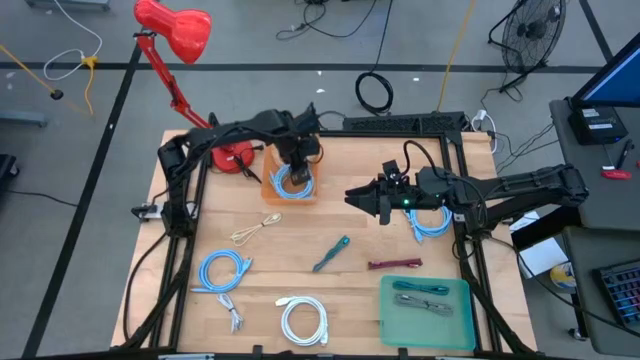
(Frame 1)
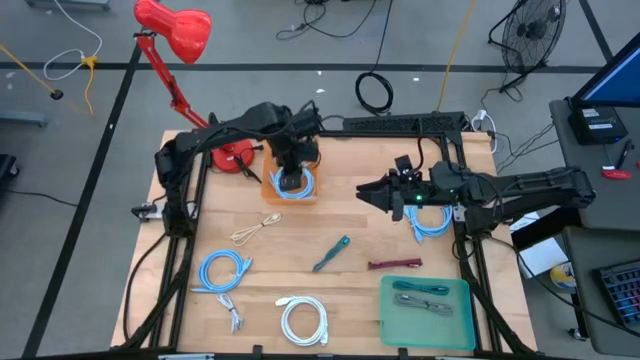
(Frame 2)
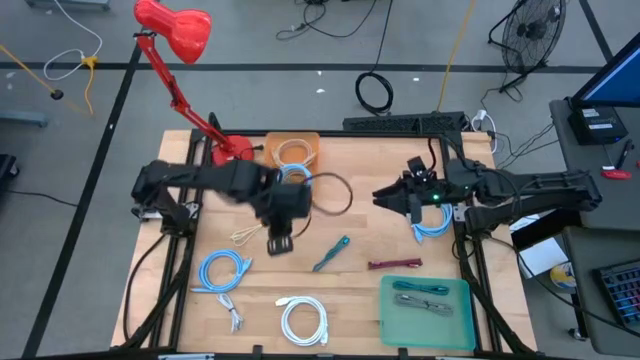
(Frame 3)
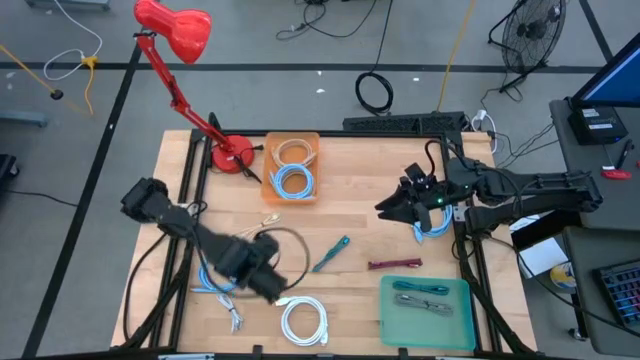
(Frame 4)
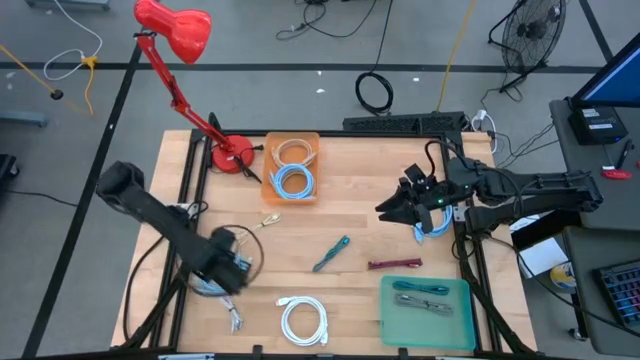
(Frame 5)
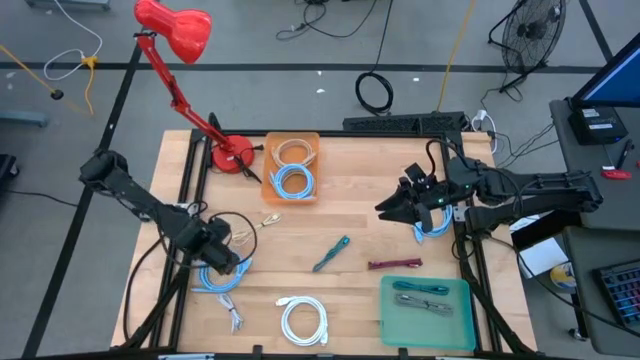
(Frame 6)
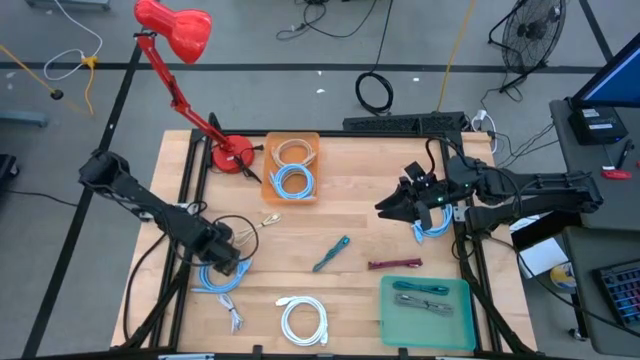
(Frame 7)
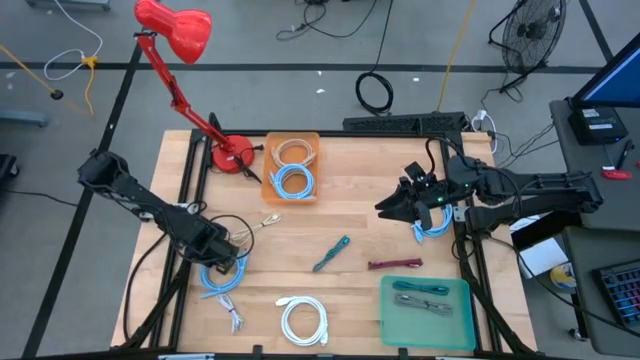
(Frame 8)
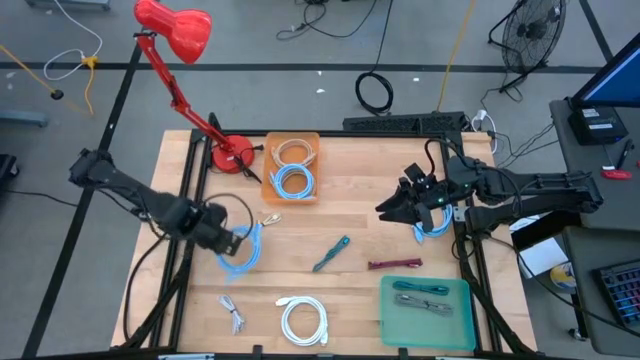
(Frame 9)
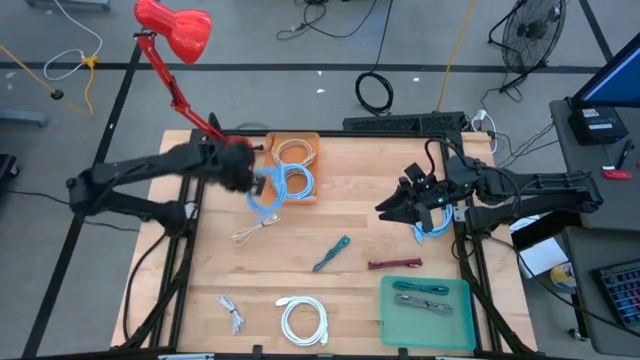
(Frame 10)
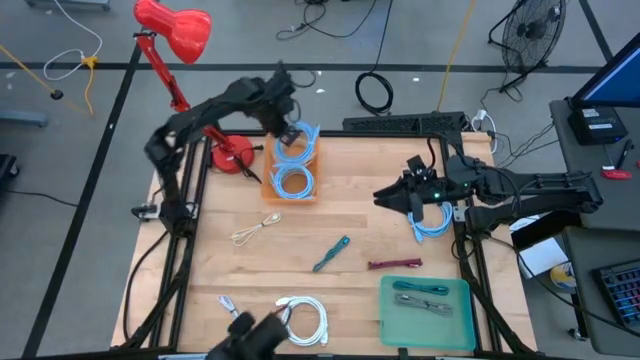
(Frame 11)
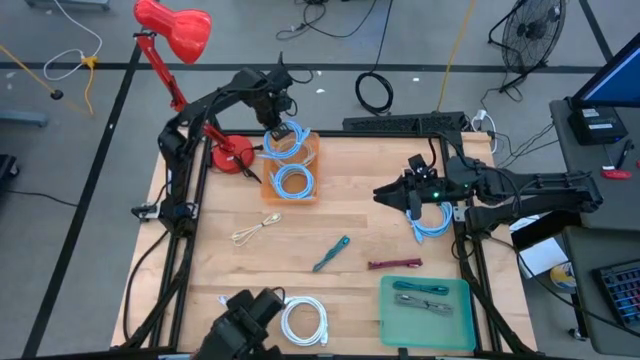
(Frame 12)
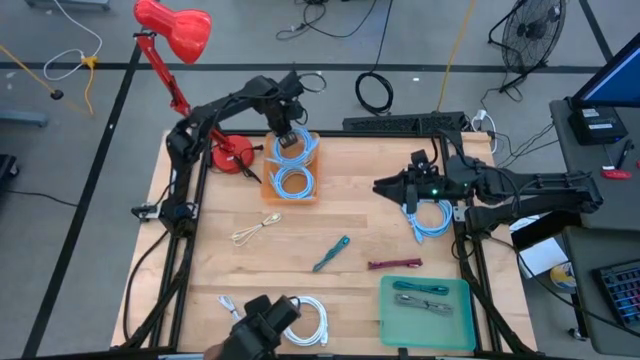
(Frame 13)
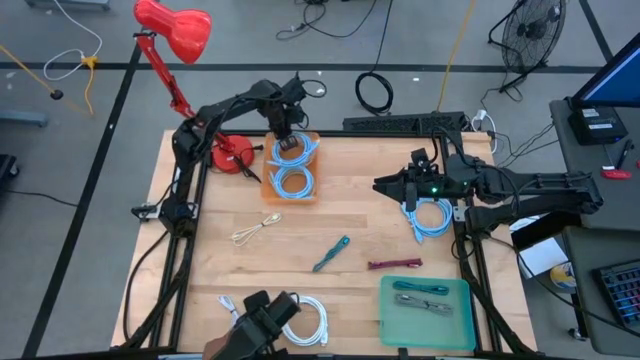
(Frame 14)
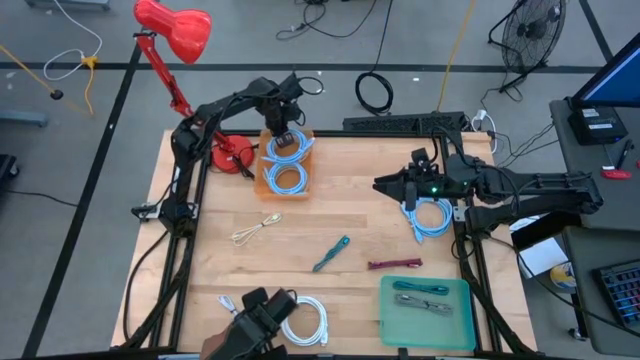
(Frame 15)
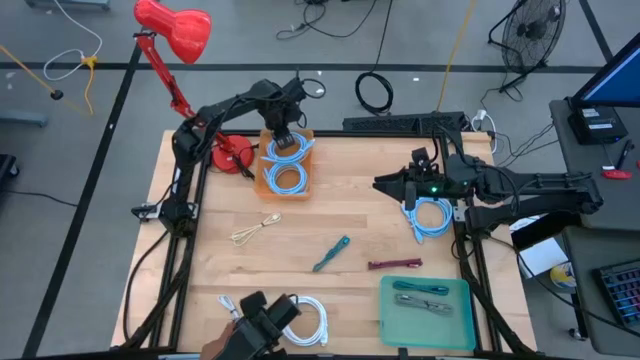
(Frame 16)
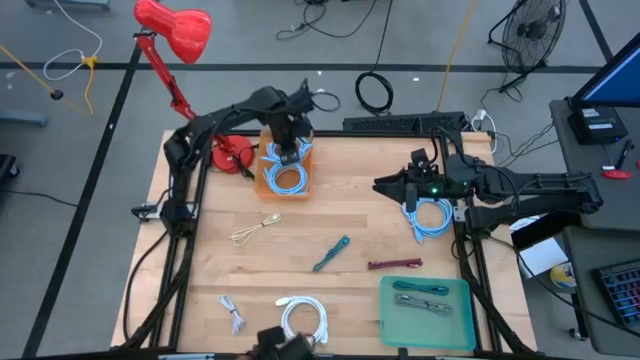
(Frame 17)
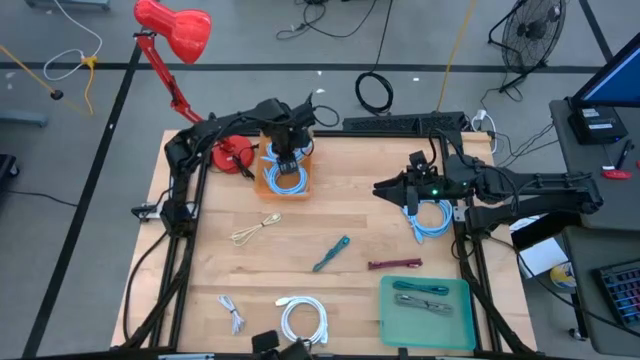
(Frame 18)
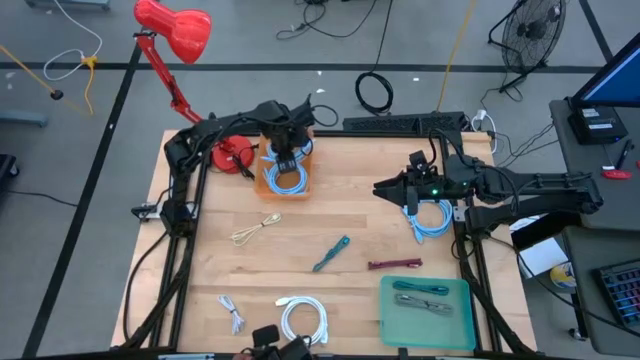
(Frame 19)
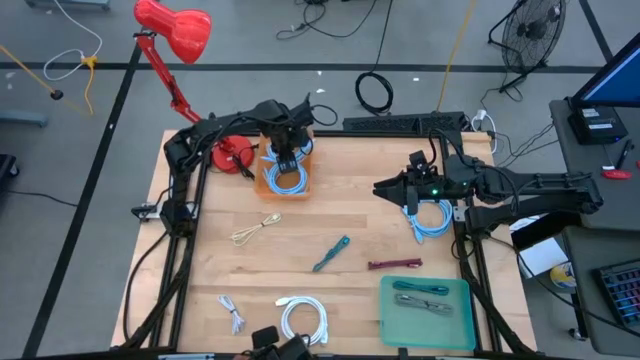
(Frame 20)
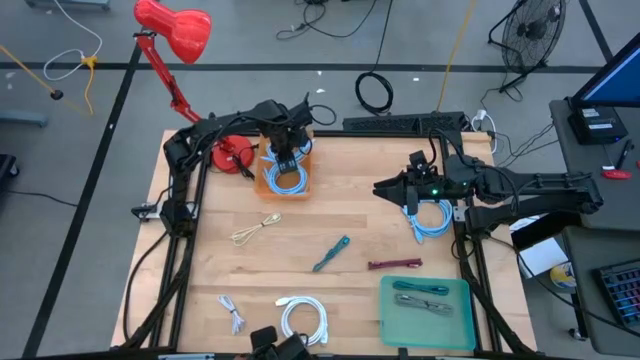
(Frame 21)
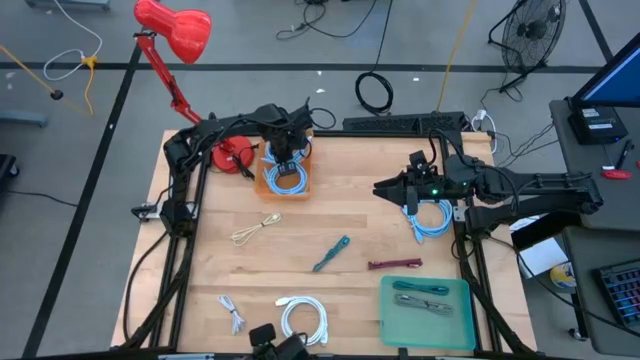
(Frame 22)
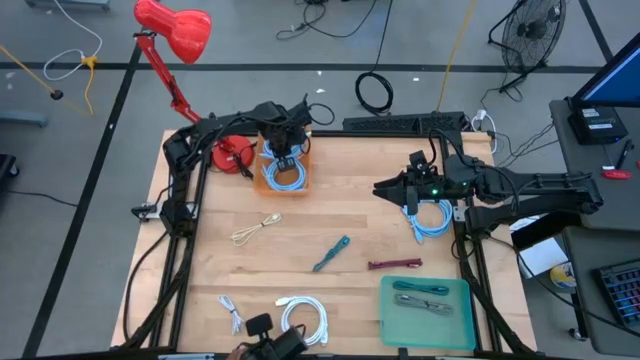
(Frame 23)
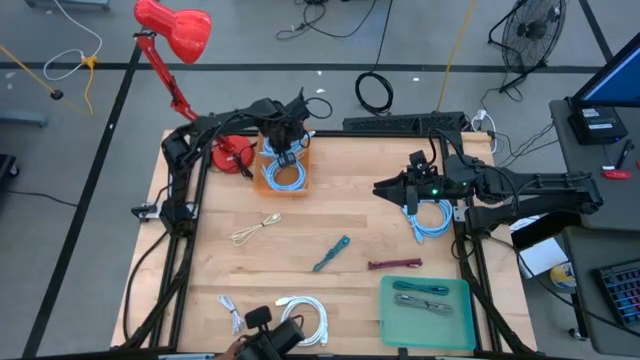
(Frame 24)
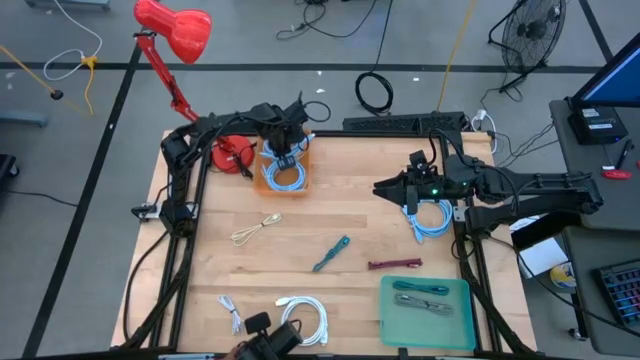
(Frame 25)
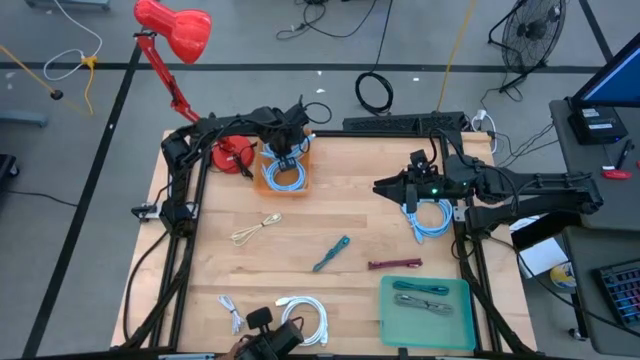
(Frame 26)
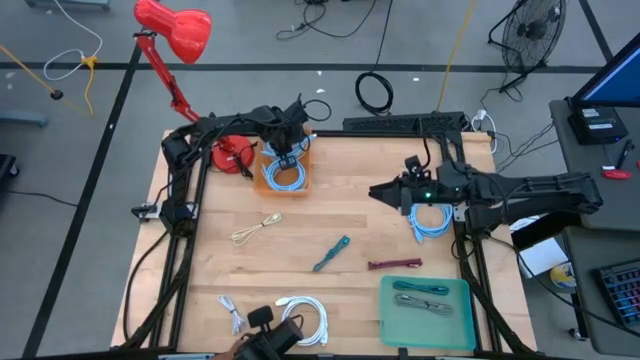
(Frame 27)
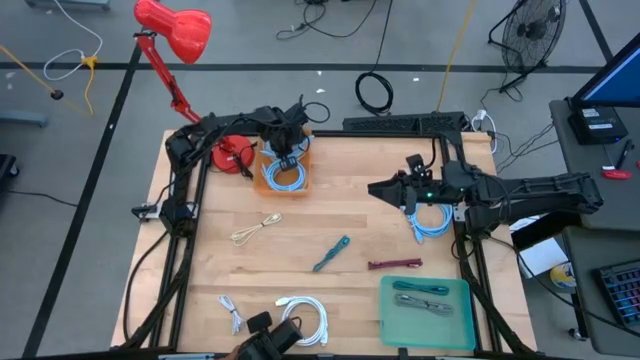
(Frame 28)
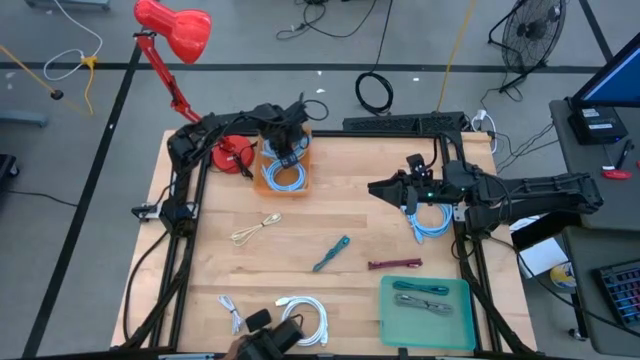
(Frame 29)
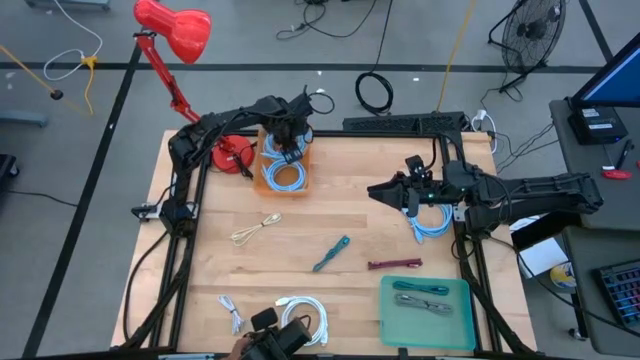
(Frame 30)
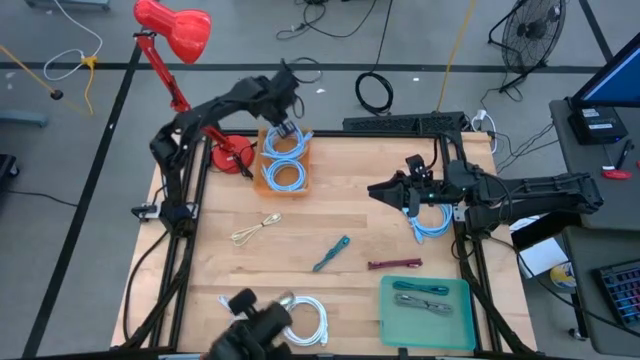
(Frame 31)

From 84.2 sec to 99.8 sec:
Task: Pick & Place USB Port
Put the left light blue wire cable into the the orange bin

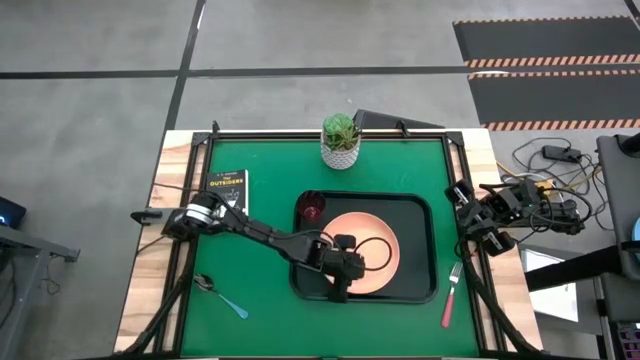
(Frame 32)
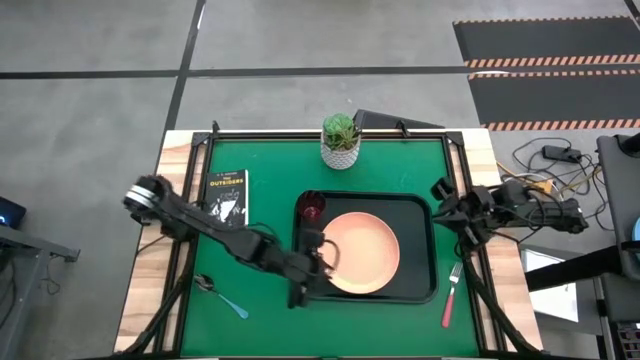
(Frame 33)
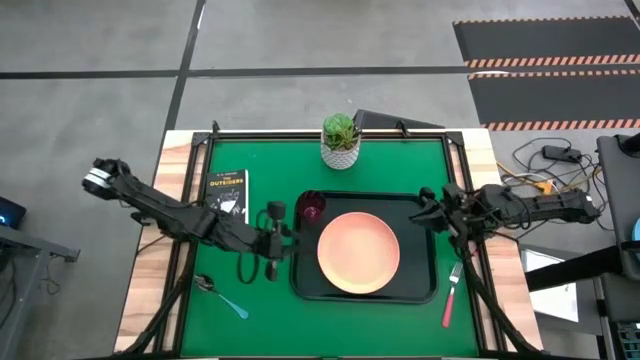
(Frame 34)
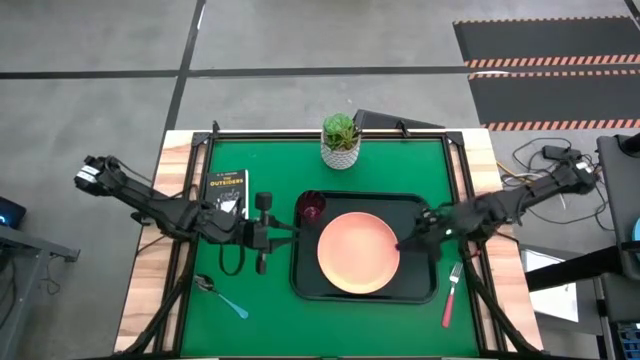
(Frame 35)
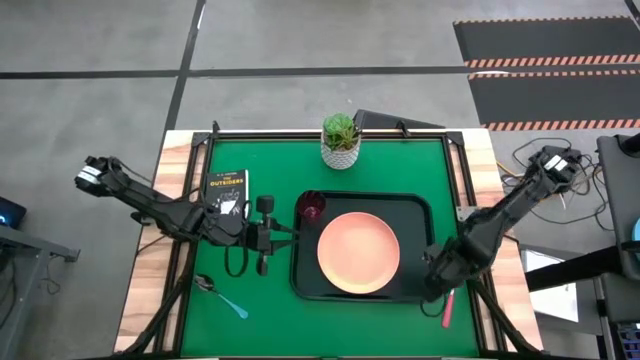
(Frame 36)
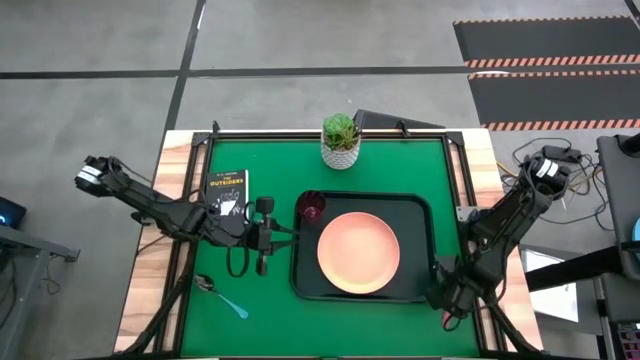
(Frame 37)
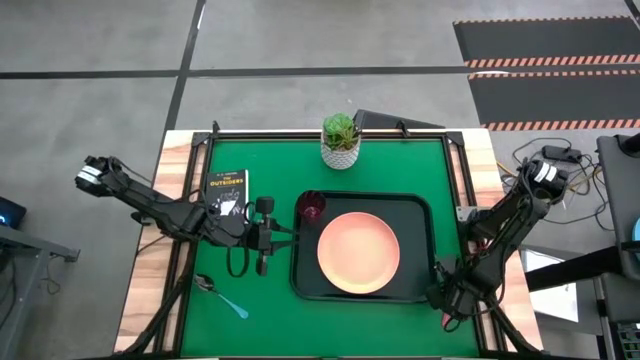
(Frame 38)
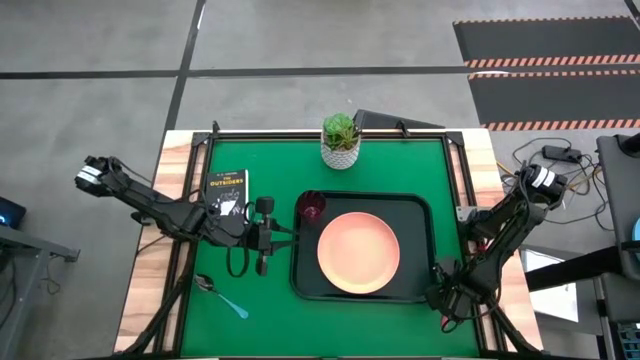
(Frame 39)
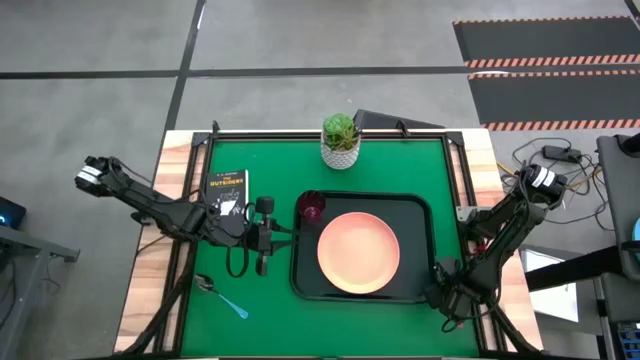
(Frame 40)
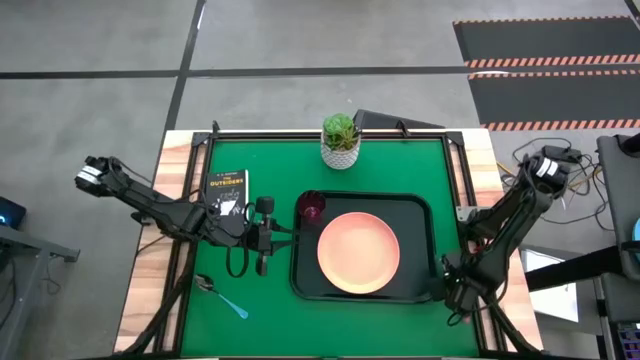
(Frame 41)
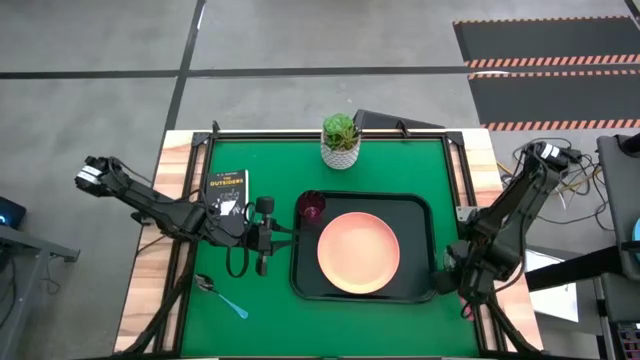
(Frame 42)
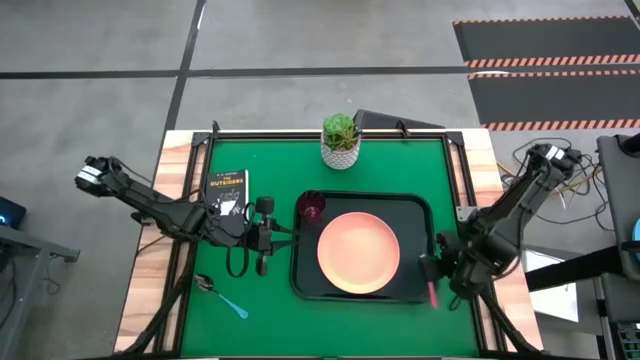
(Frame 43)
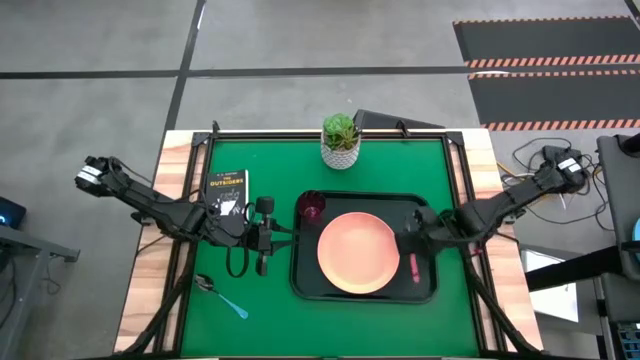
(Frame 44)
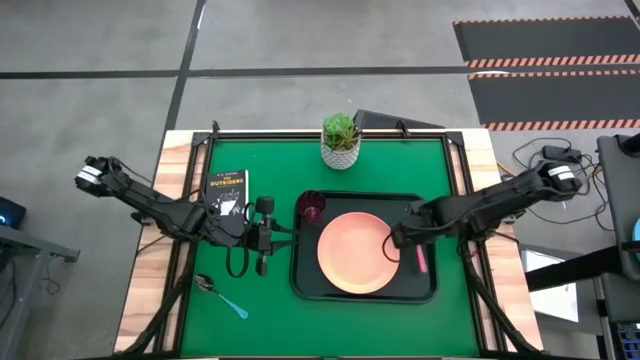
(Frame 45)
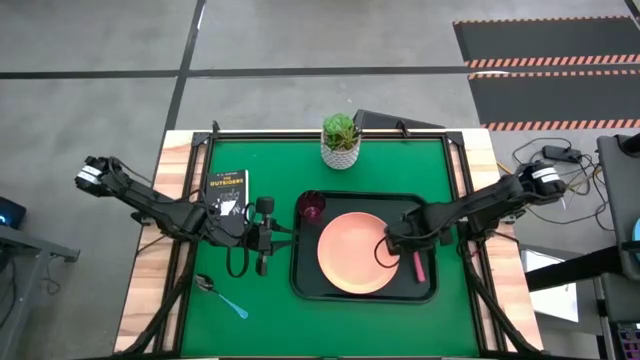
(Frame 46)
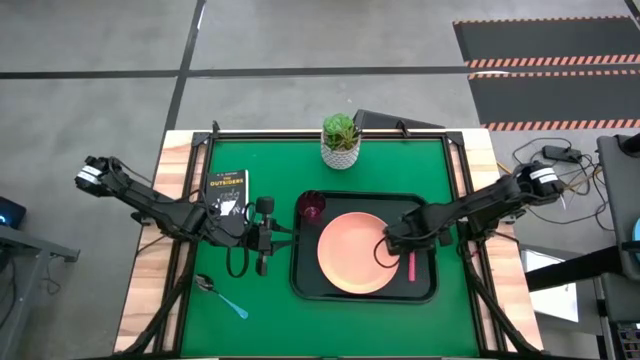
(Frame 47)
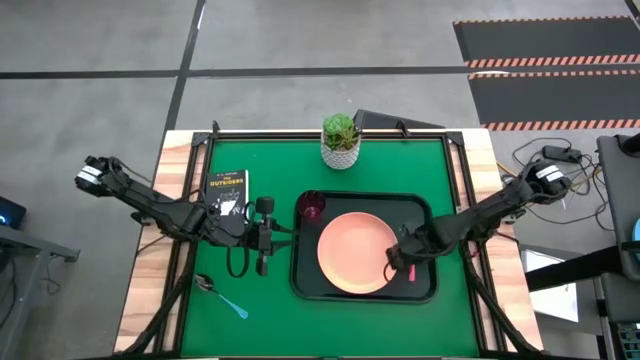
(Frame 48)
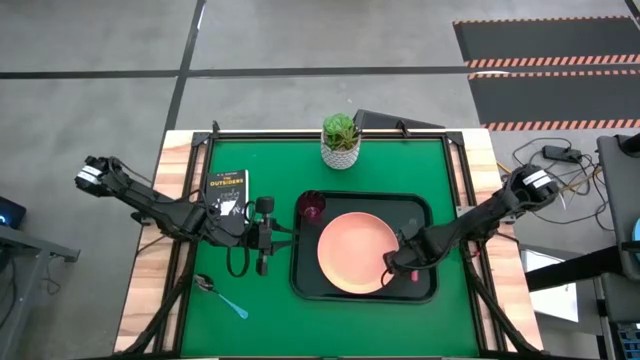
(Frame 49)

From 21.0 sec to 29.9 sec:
Task: Pick and place plate/cup/fork/spoon on tray
Put the pink fork on the black tray at the right of the light orange plate
